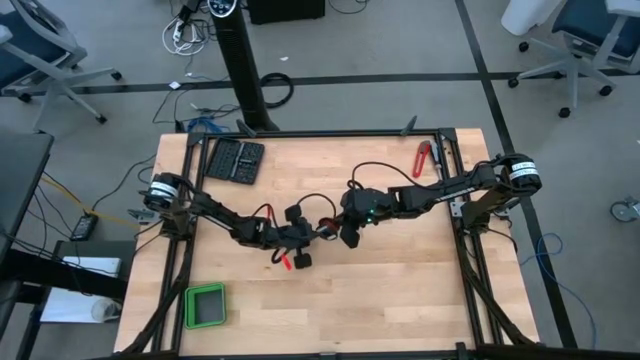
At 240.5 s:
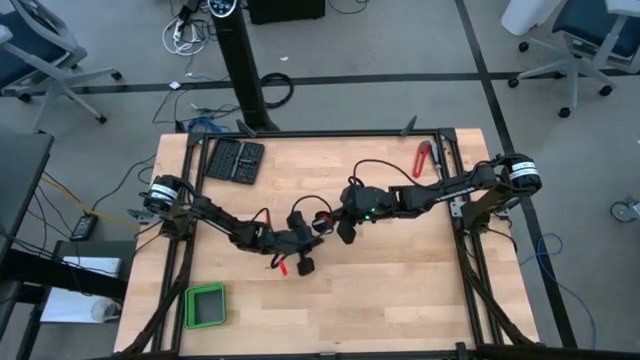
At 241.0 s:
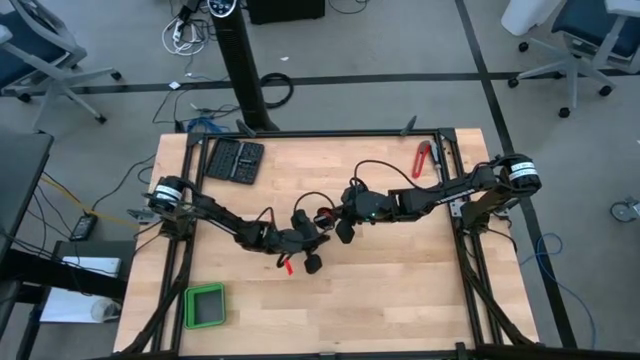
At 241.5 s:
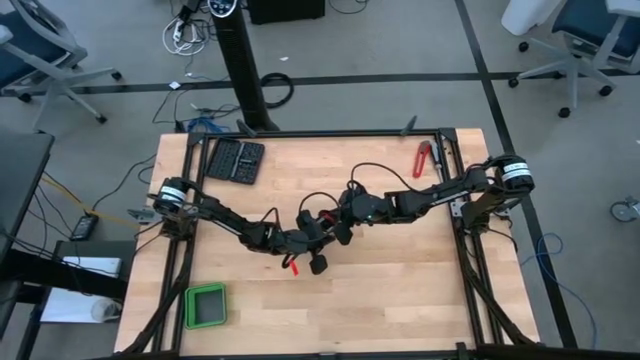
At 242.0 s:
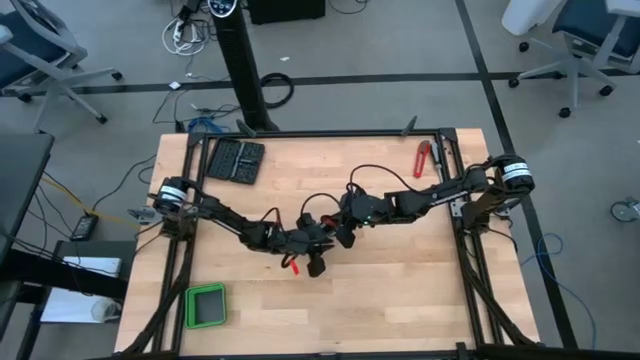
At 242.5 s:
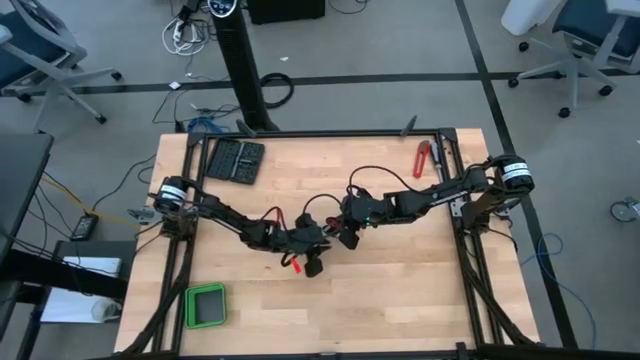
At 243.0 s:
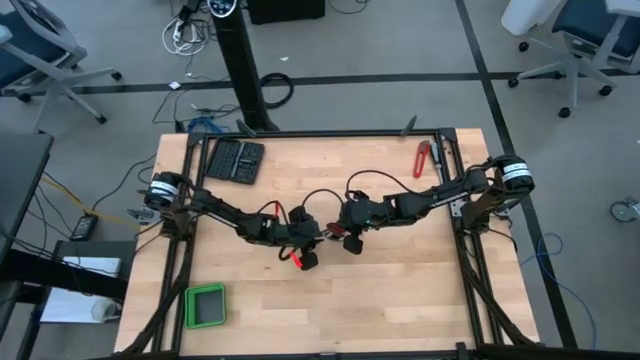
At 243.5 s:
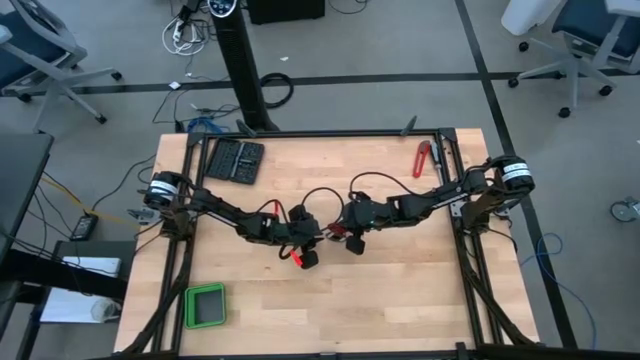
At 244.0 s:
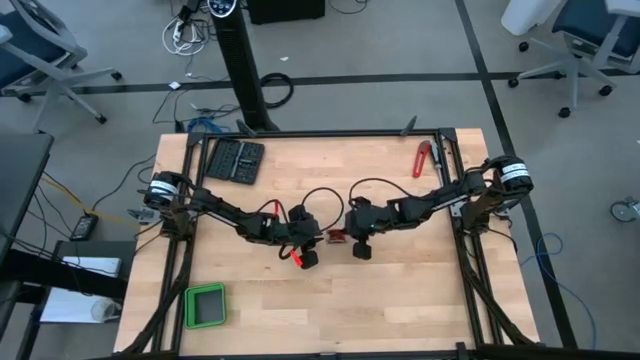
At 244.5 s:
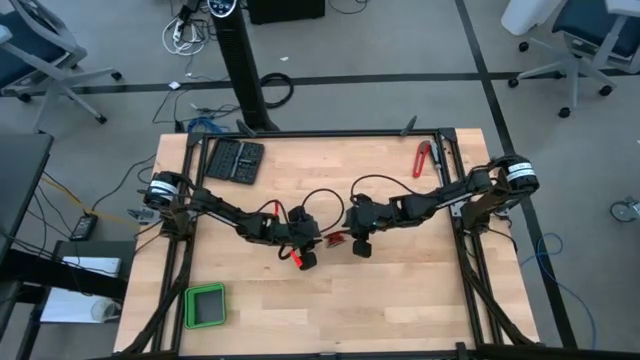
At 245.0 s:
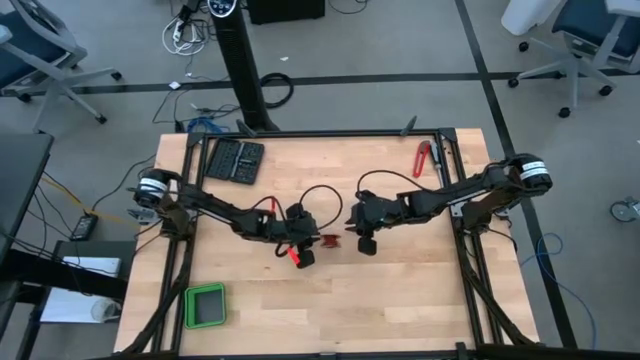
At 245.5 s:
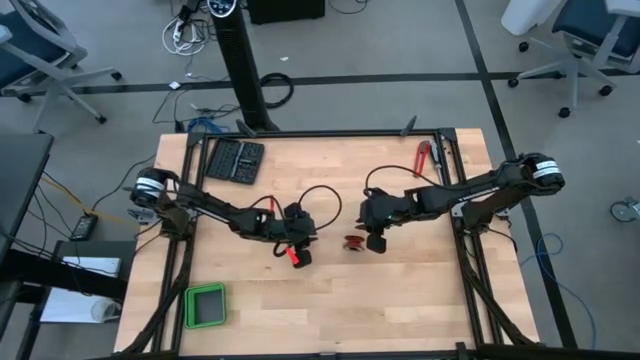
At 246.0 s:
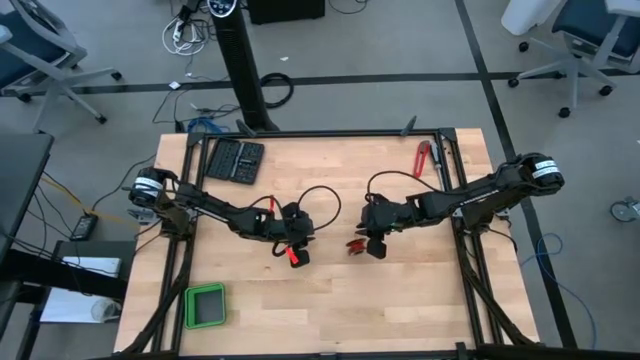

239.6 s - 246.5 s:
Task: Coil cords
Coil the red wire onto the black spool

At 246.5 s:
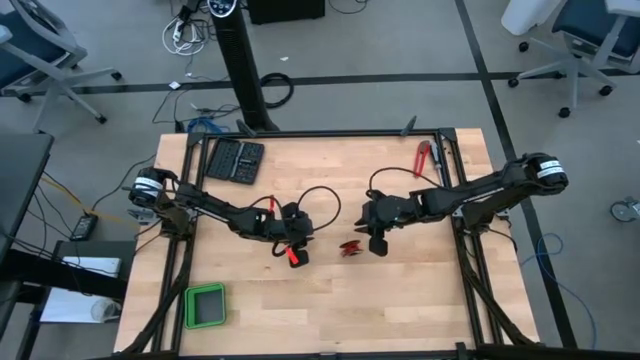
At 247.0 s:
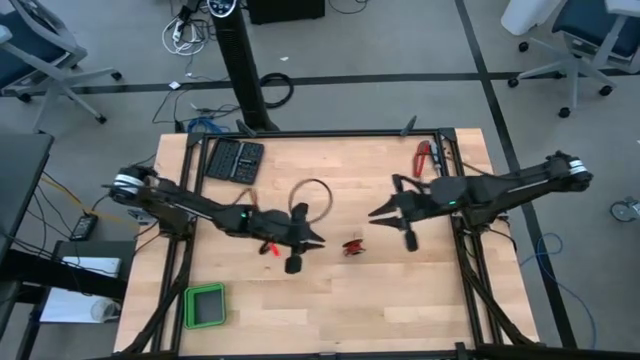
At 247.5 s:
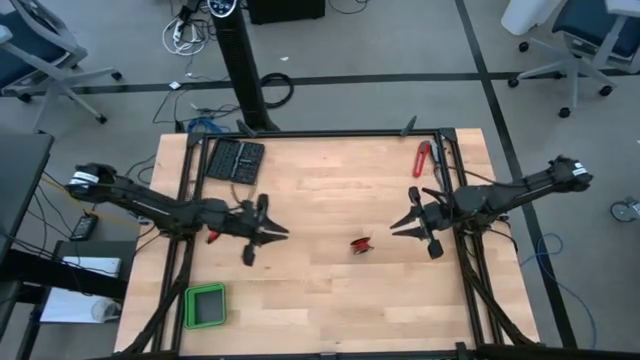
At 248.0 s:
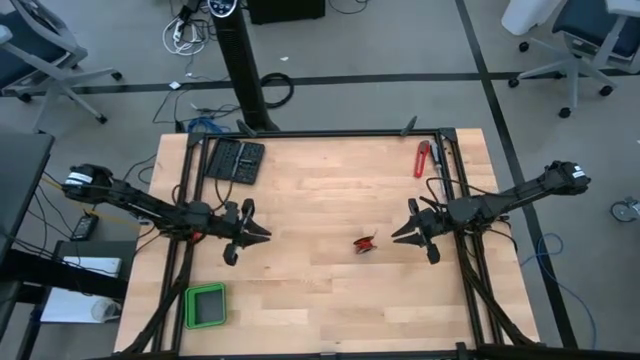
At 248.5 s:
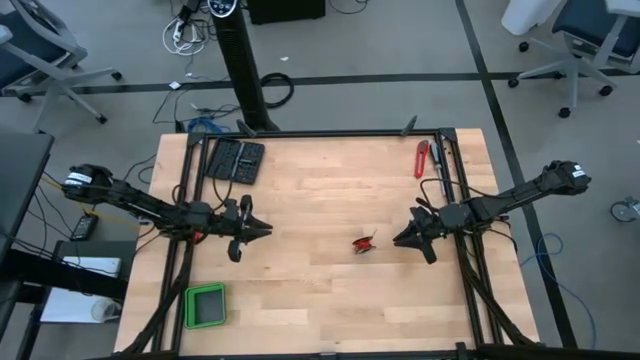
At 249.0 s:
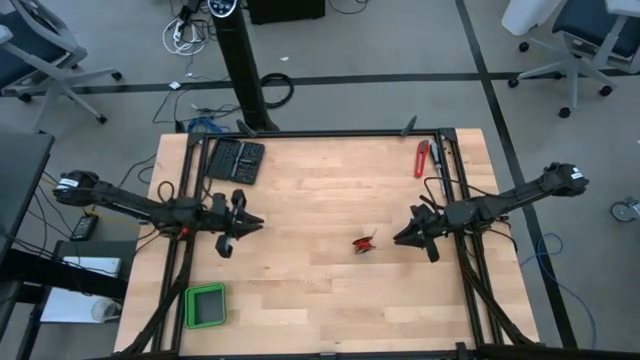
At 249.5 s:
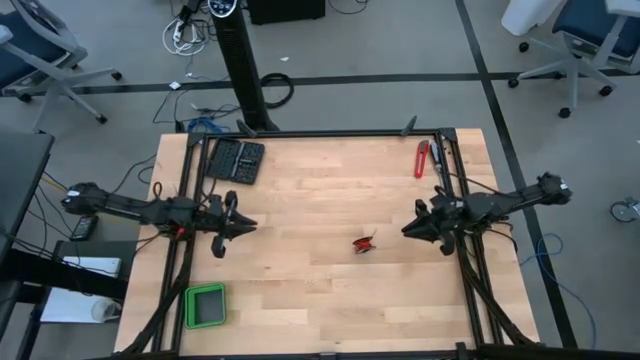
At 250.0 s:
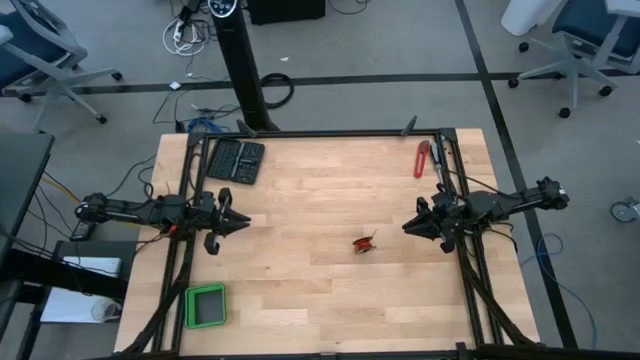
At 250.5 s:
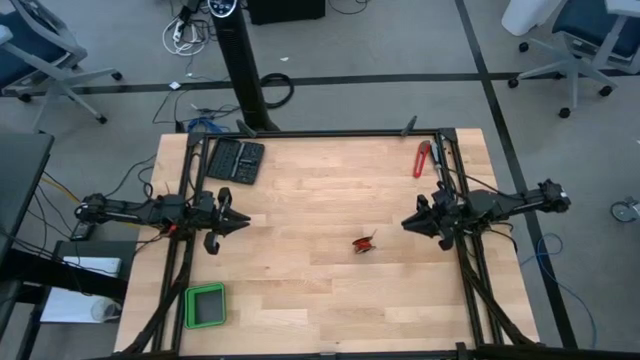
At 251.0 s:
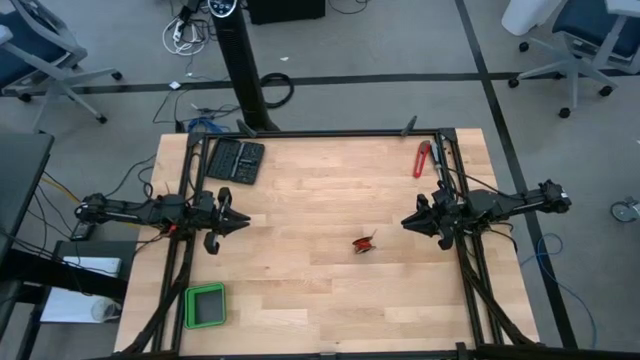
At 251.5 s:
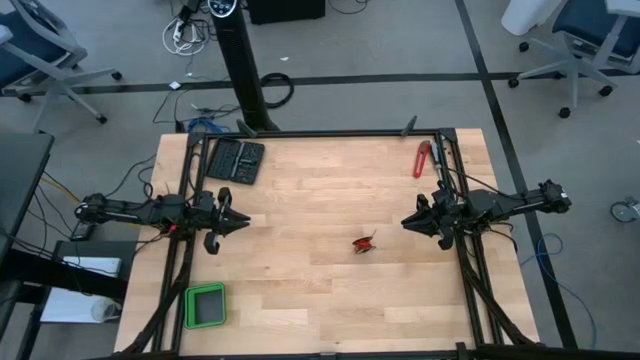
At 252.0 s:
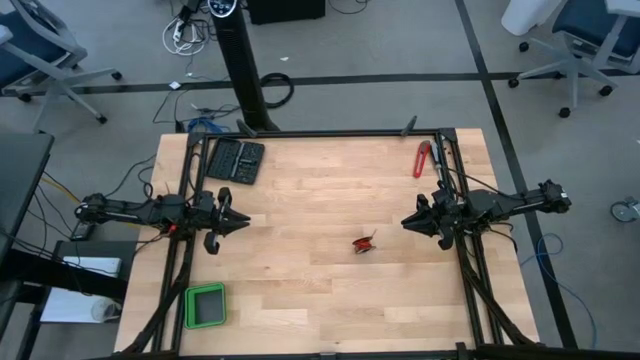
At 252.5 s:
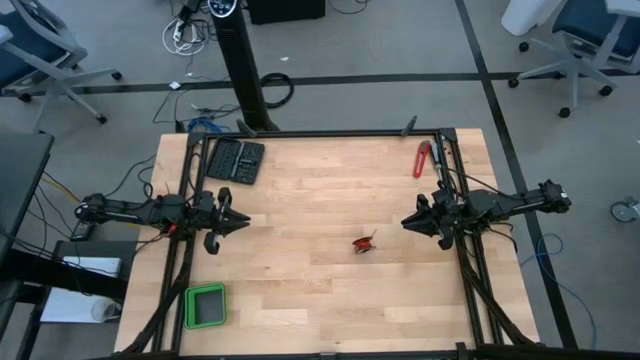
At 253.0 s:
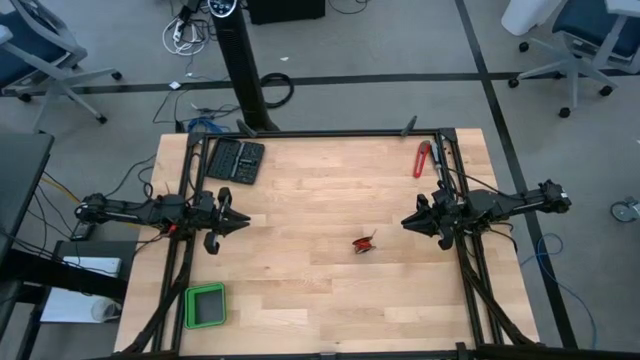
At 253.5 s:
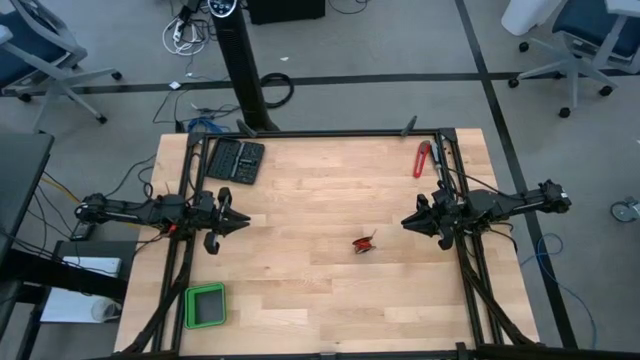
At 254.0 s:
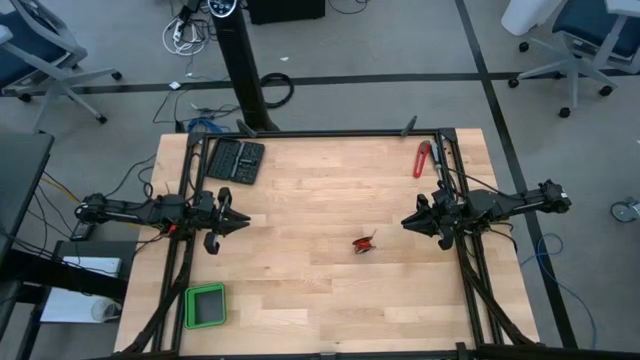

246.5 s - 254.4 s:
Return to Home Position

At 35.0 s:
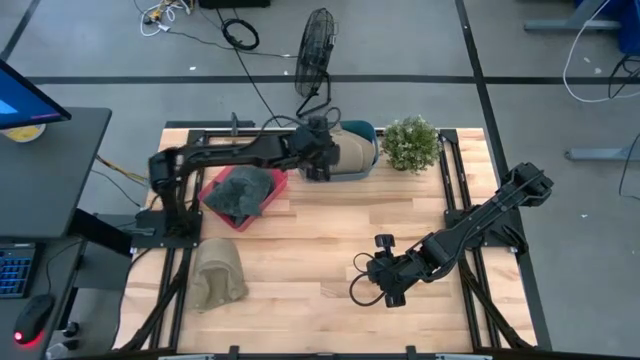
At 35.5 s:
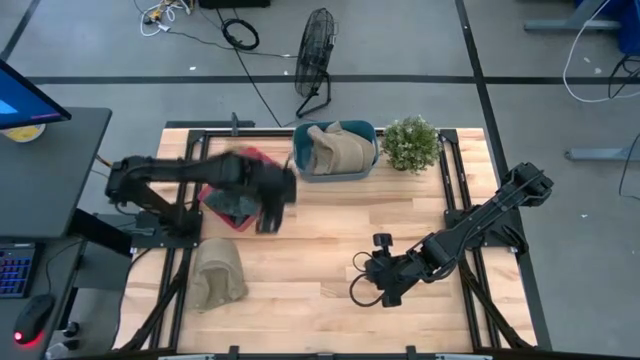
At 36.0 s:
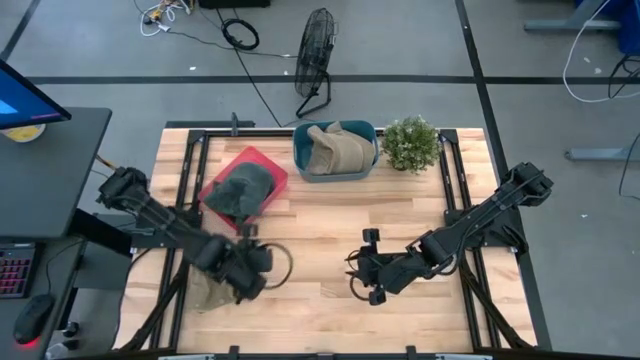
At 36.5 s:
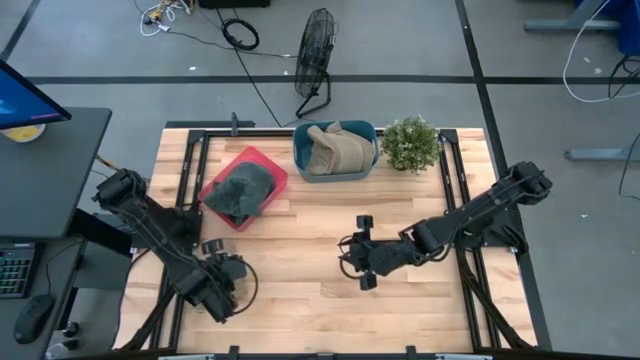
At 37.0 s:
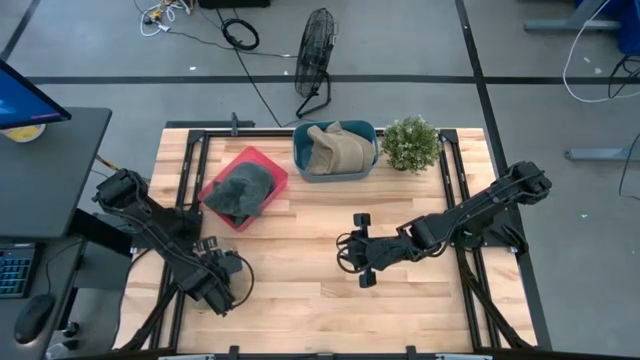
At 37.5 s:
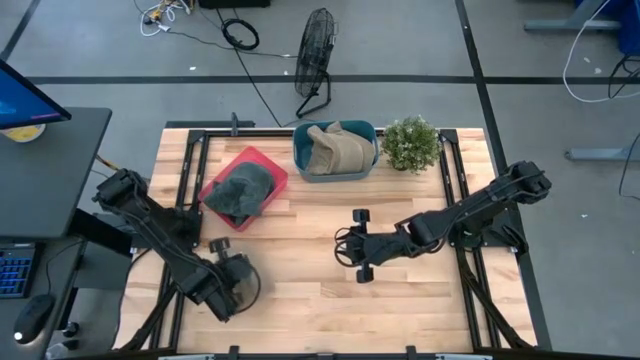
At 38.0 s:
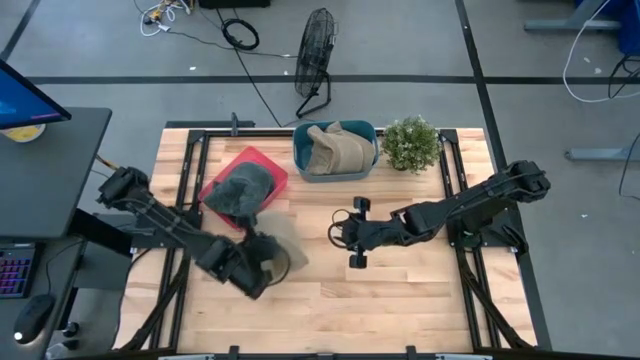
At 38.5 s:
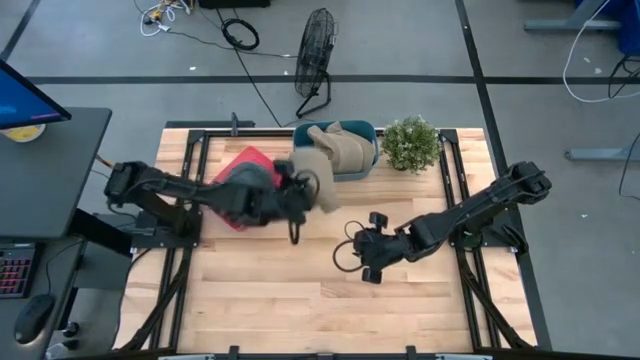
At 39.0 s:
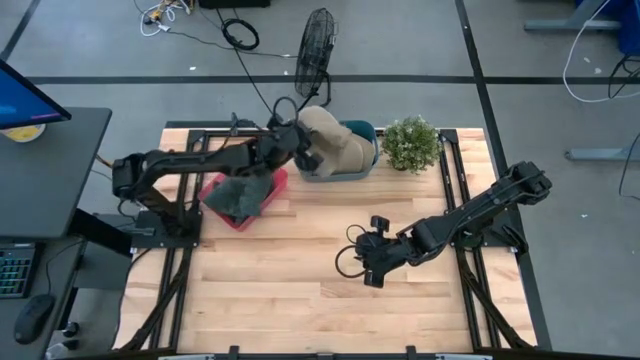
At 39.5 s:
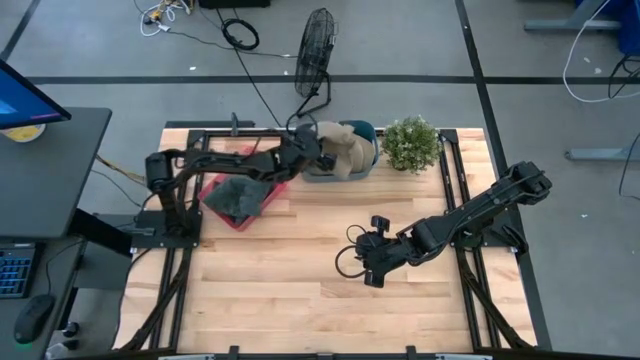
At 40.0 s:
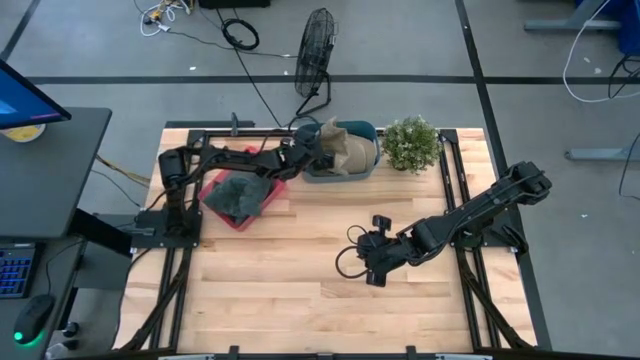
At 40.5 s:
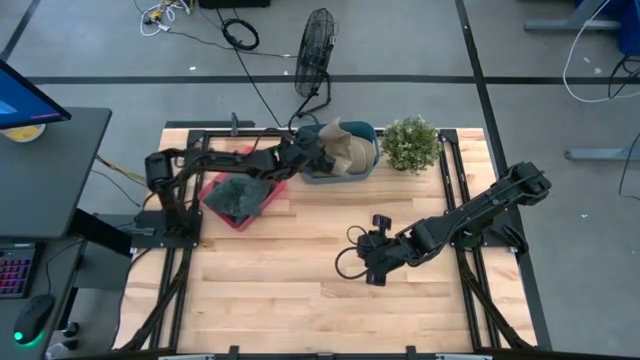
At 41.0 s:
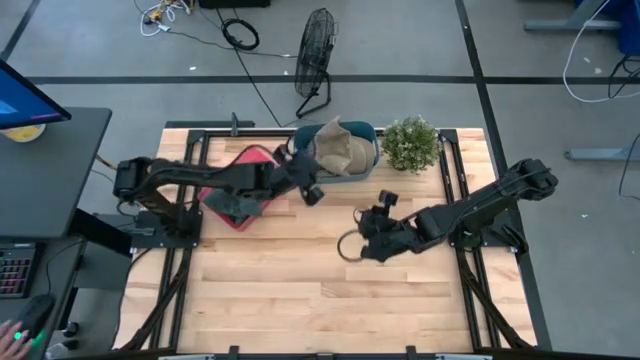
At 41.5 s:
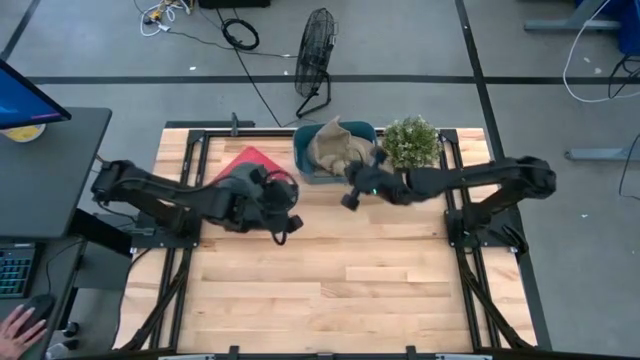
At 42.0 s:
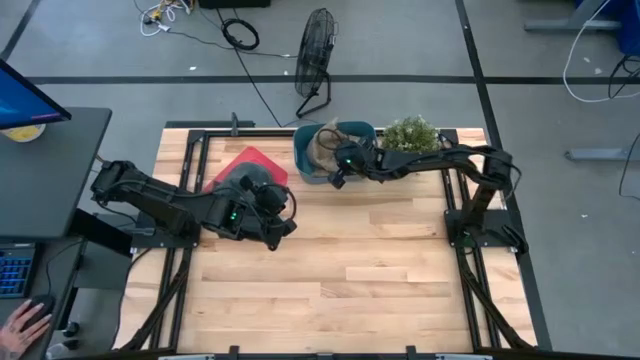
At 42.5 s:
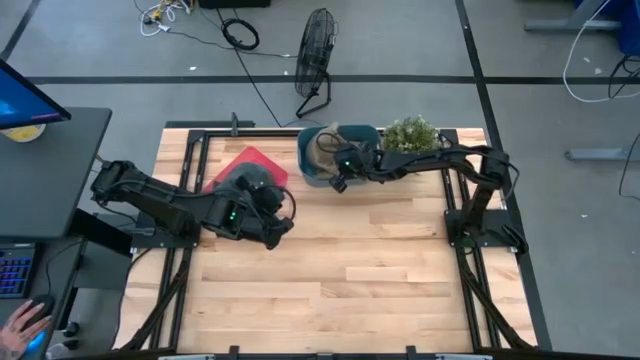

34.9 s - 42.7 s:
Task: Pick & Place hat
Put the brown cap into the blue bin
